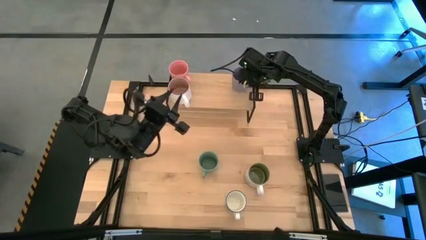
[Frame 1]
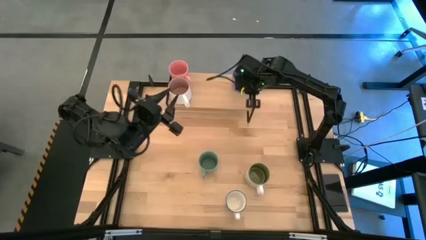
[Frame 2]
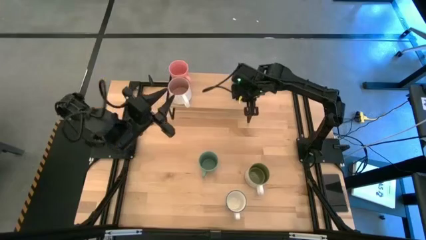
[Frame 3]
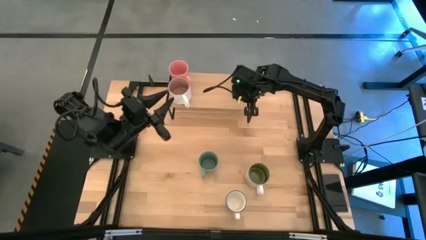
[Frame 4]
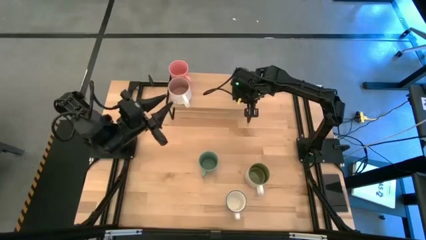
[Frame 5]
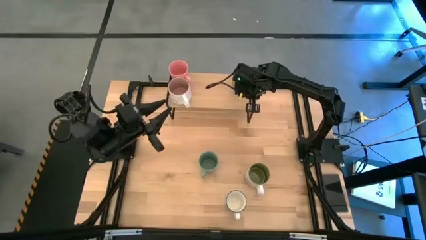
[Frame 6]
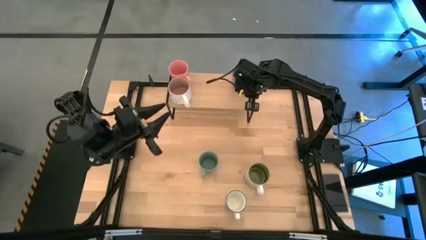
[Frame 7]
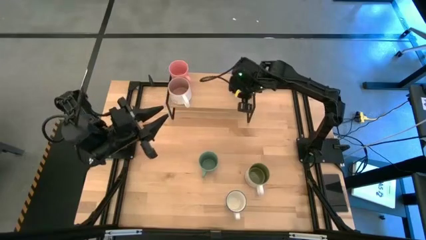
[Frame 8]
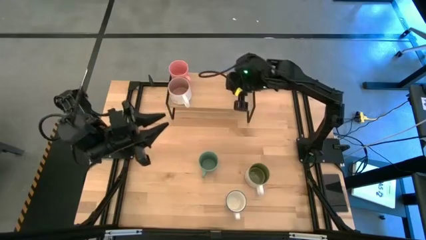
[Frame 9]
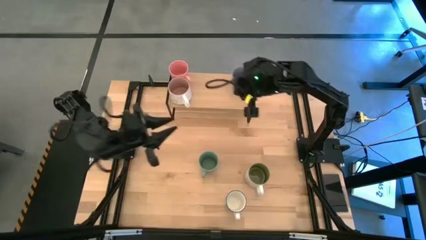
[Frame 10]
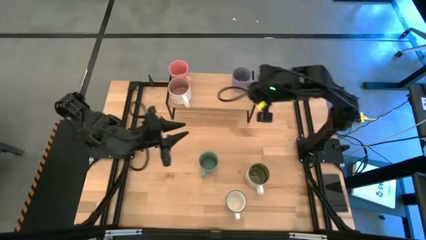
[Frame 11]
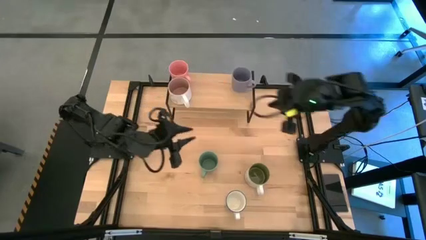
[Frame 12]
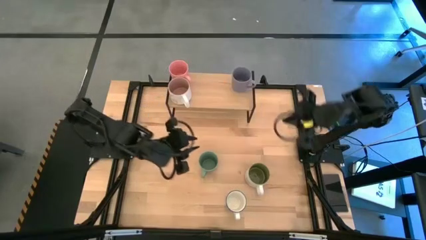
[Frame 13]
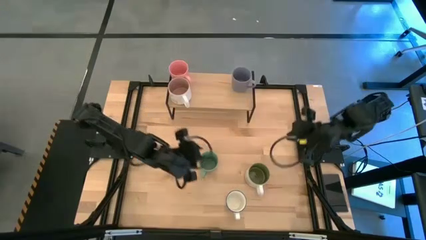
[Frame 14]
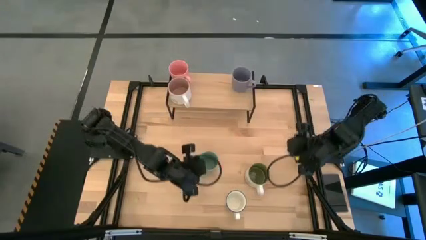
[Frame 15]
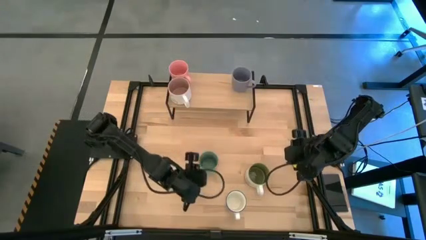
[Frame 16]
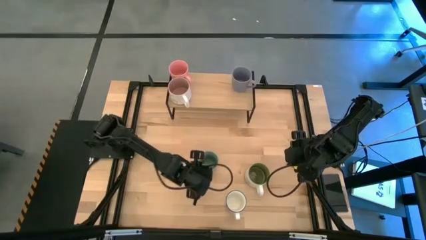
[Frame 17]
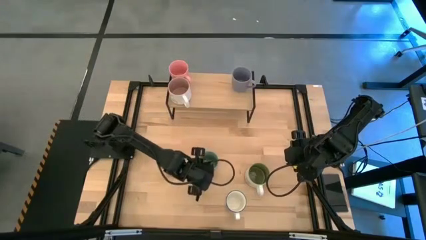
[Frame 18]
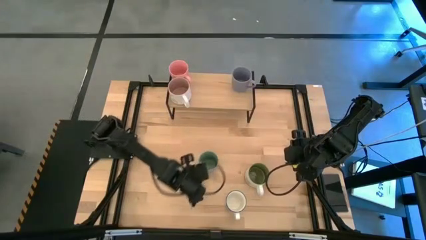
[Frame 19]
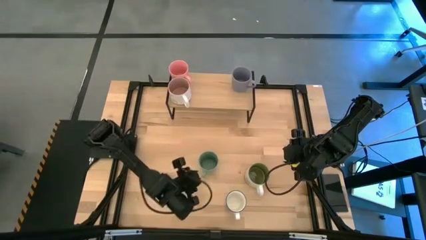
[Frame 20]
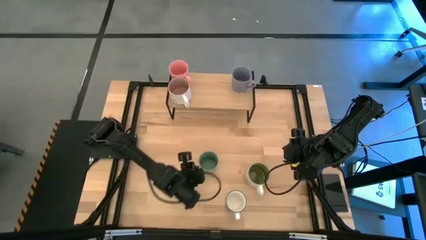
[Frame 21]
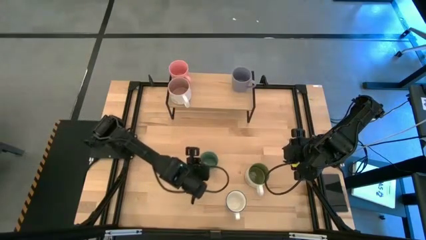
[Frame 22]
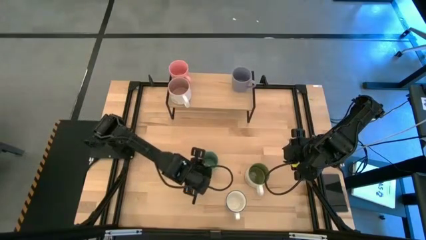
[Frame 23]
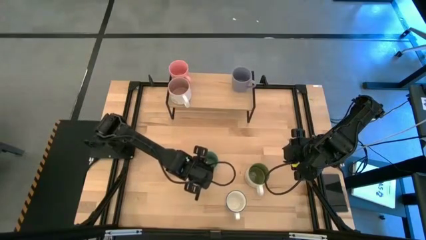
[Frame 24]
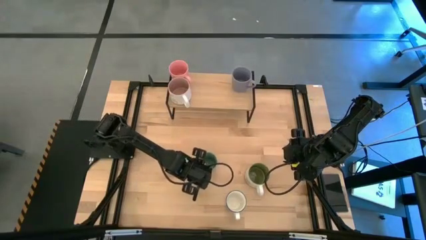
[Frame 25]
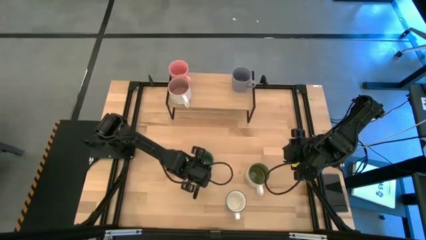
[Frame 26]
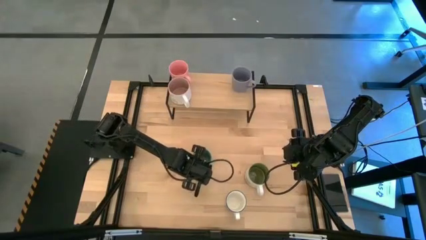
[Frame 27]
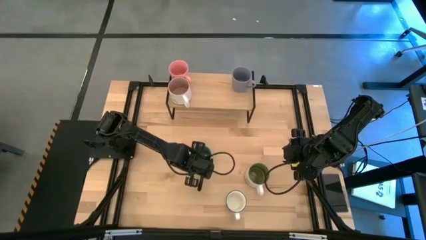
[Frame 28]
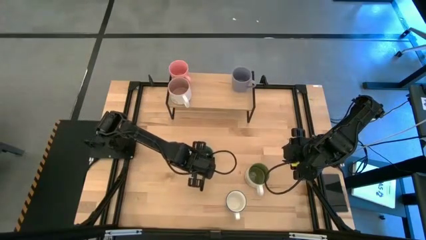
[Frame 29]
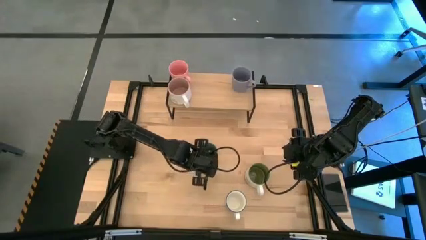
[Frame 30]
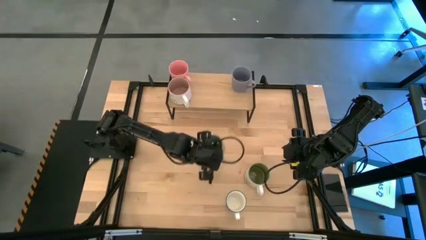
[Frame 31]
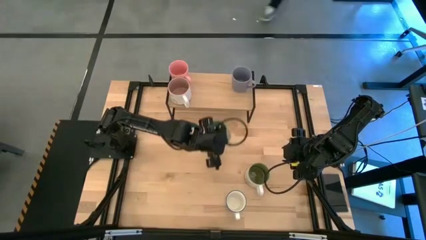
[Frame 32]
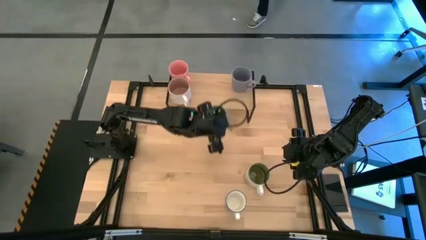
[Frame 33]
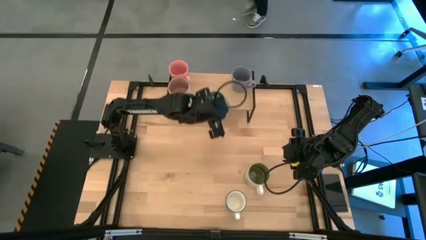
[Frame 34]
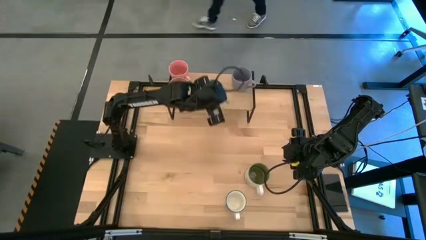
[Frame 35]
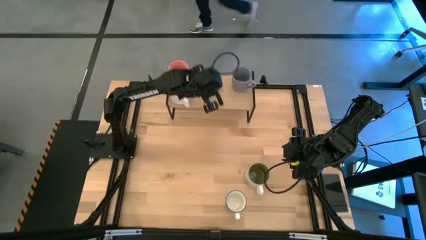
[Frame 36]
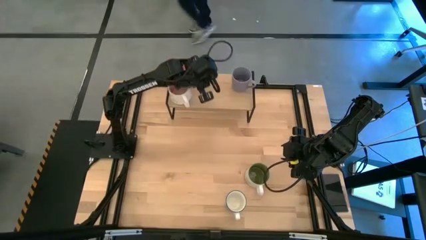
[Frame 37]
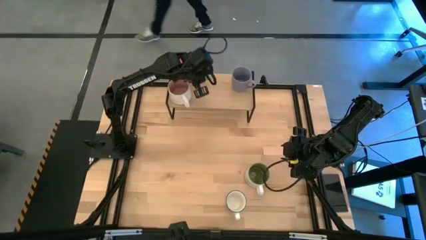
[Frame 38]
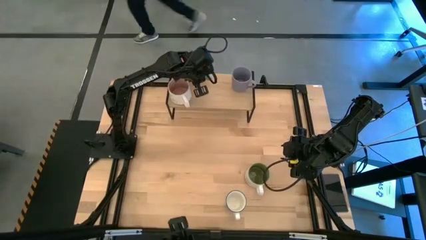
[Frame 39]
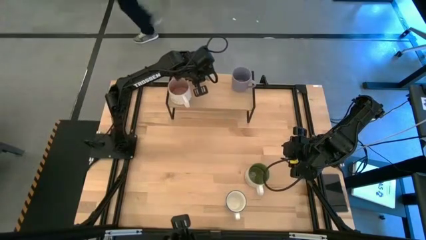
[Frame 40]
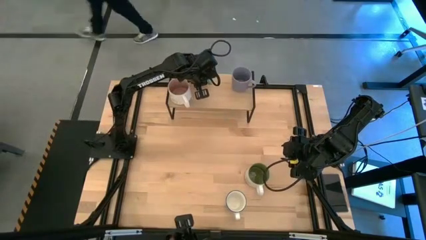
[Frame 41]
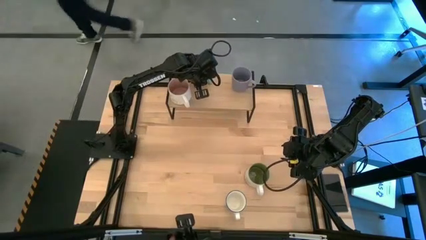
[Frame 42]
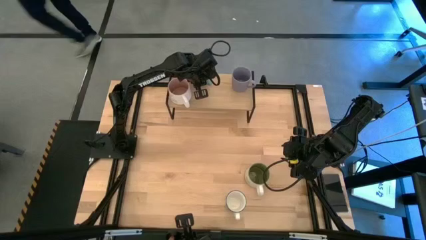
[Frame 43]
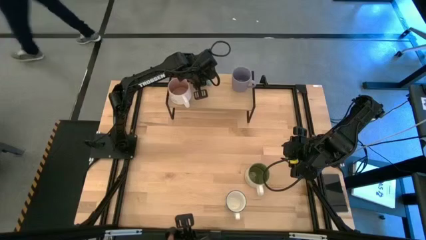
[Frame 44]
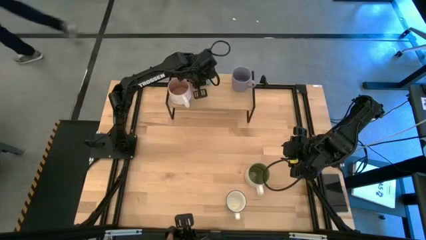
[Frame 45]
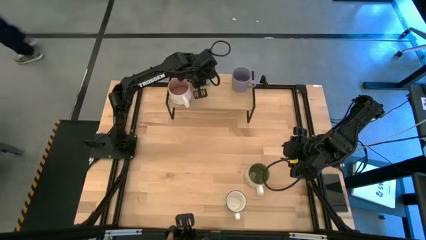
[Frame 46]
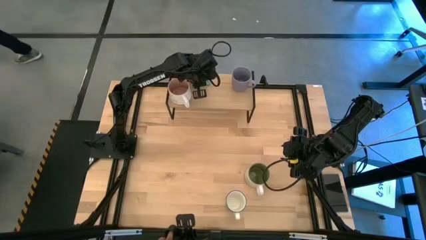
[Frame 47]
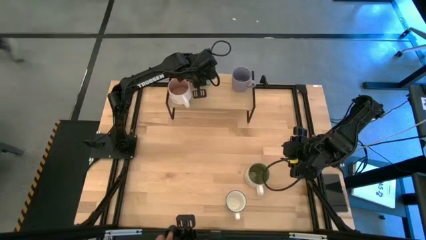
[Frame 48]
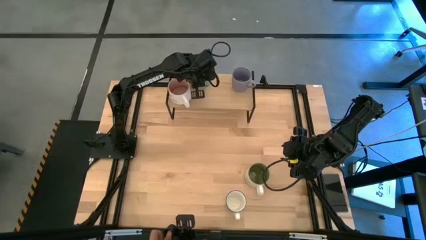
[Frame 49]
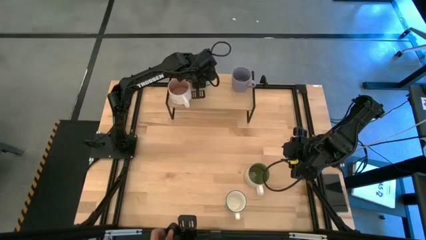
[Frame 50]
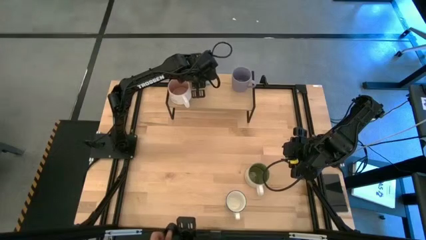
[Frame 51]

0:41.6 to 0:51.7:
Task: Place coffee mugs
Put the light green mug on the shelf

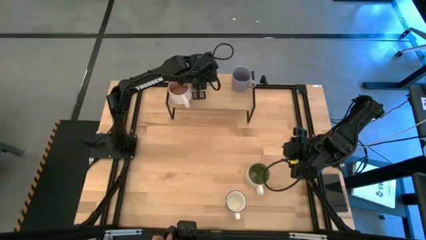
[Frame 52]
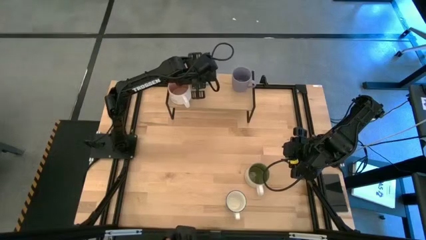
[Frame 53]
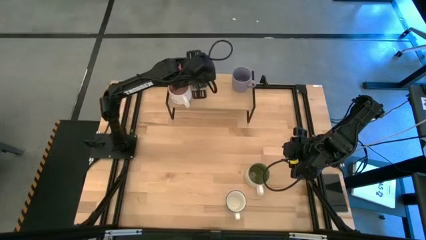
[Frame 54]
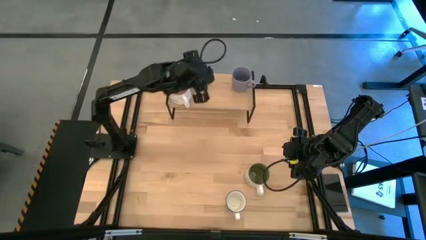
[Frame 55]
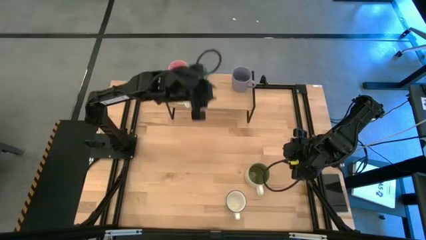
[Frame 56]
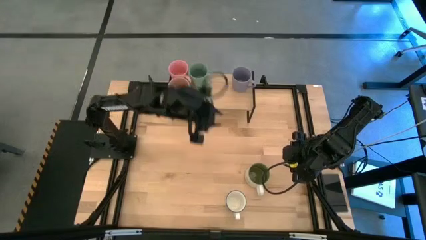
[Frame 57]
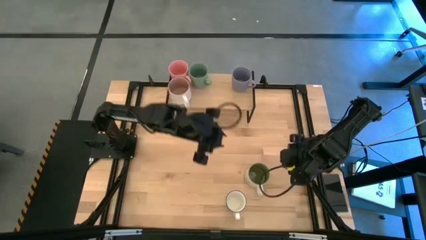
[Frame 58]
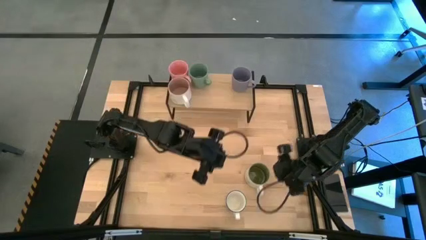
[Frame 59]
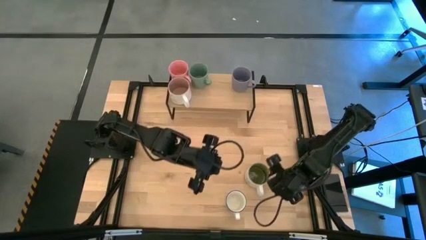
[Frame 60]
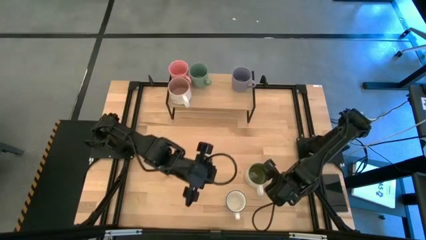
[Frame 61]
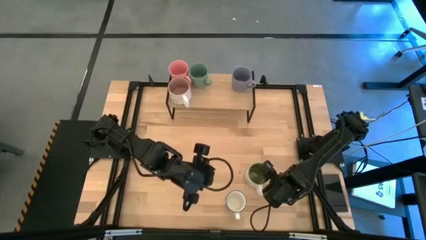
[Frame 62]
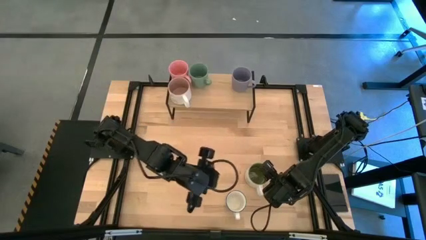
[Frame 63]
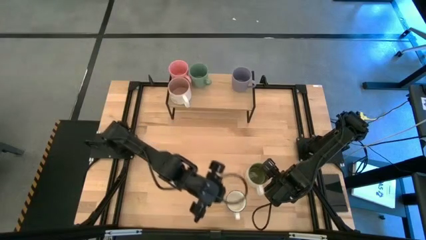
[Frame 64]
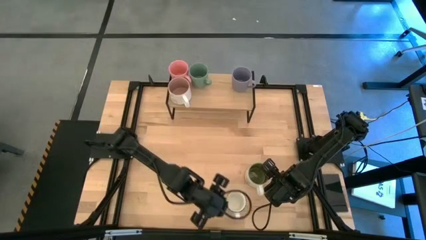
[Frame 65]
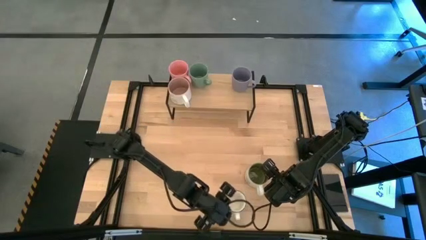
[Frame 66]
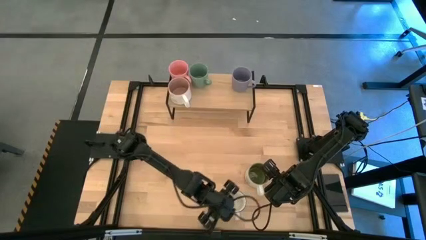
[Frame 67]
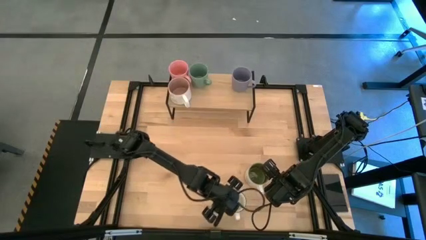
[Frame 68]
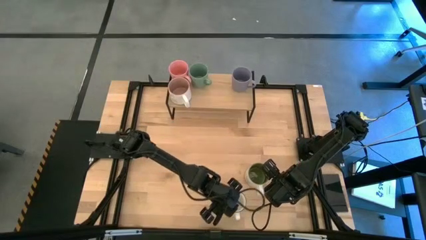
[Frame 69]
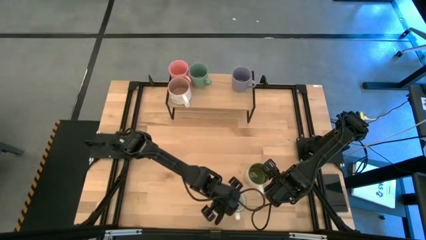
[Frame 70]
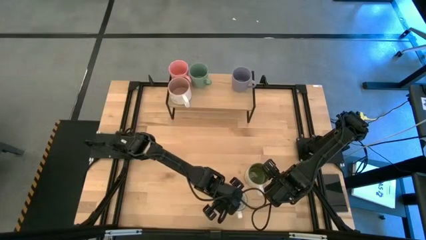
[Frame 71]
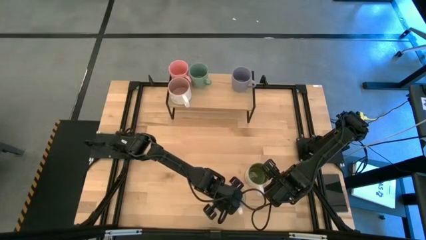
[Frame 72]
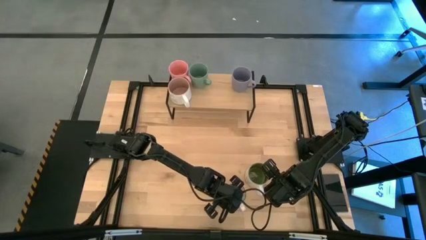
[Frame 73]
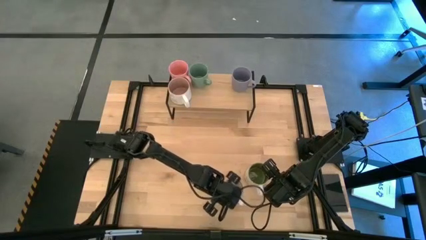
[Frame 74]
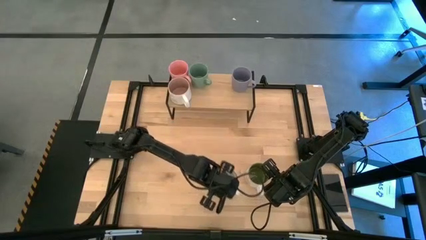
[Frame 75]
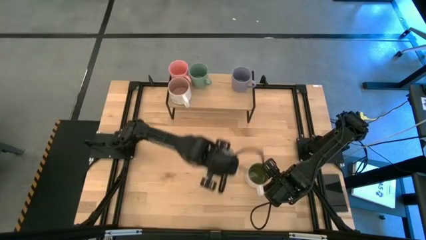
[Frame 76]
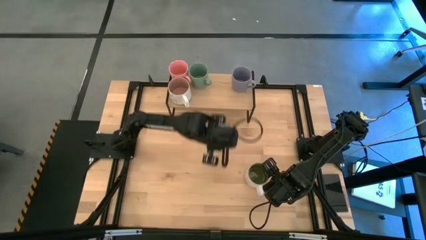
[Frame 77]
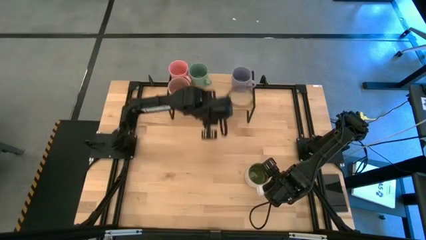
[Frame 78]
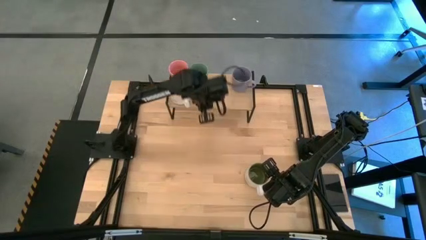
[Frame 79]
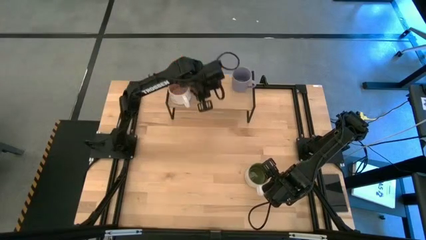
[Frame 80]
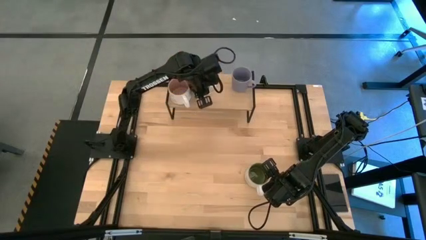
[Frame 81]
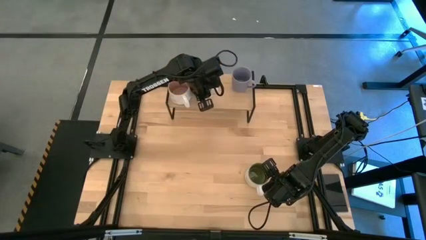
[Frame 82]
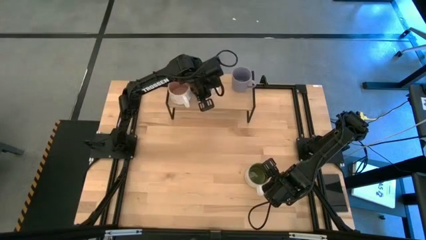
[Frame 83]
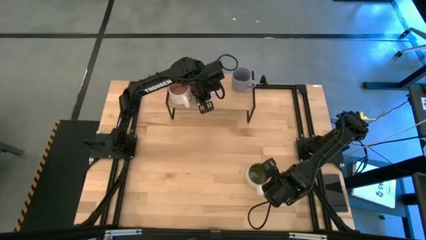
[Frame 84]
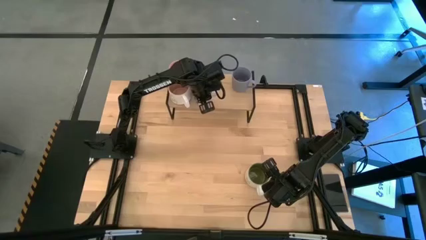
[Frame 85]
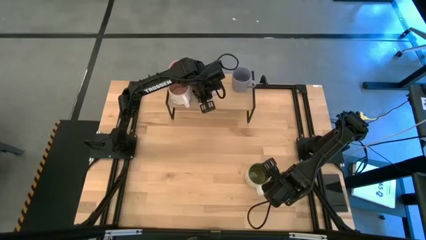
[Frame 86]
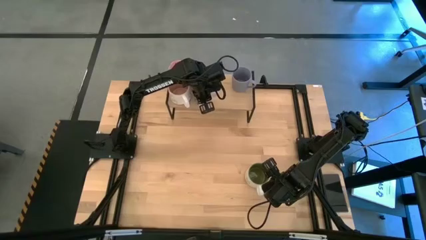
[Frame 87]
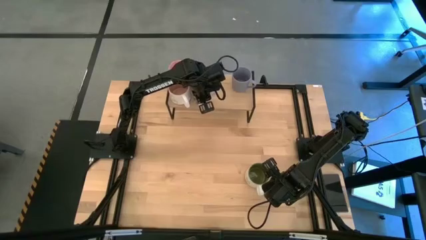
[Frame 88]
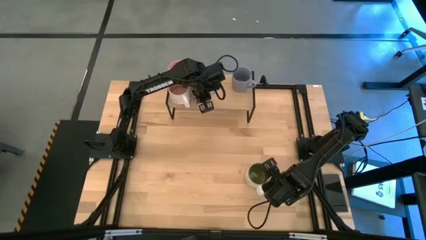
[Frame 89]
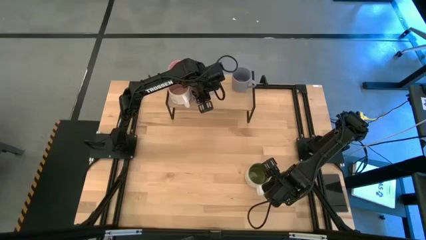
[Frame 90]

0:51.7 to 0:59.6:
Put the white patterned mug on the shelf
